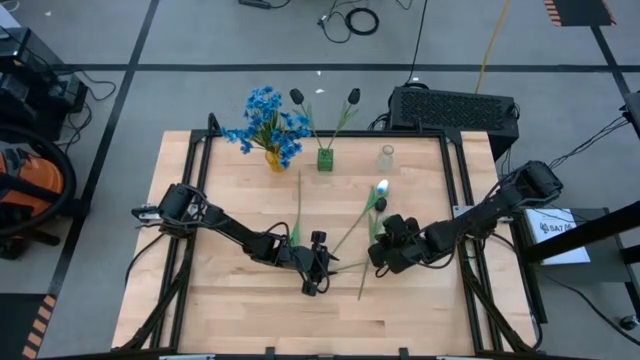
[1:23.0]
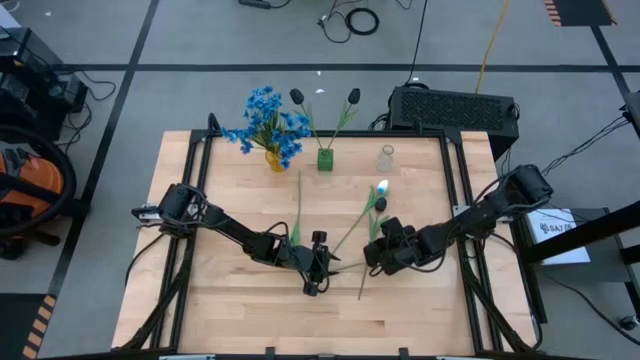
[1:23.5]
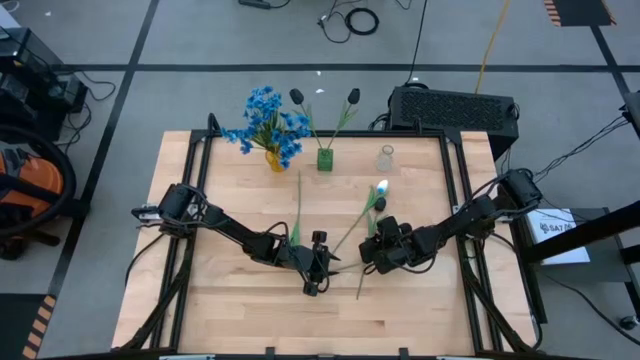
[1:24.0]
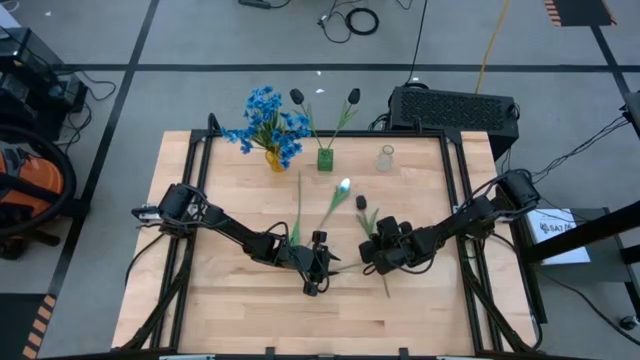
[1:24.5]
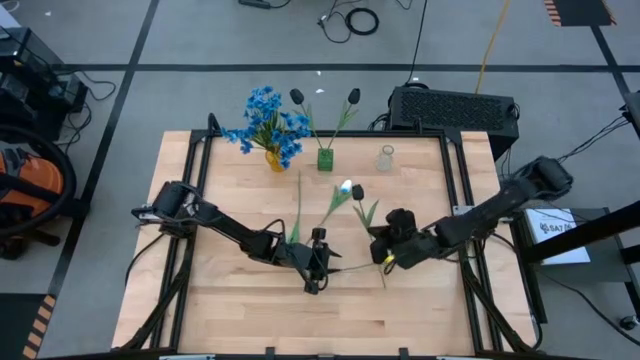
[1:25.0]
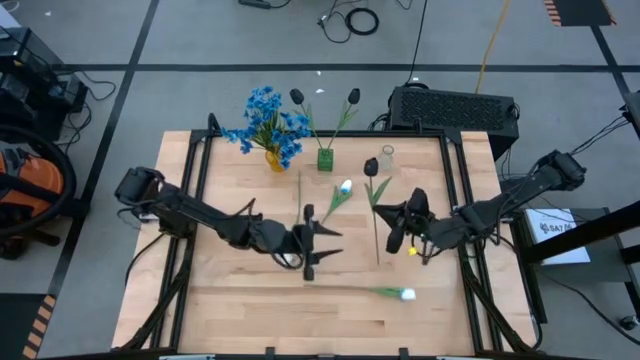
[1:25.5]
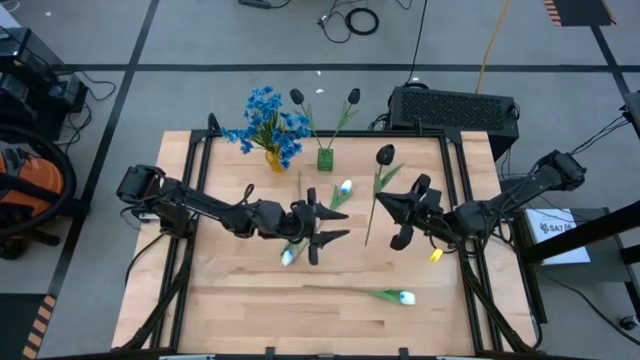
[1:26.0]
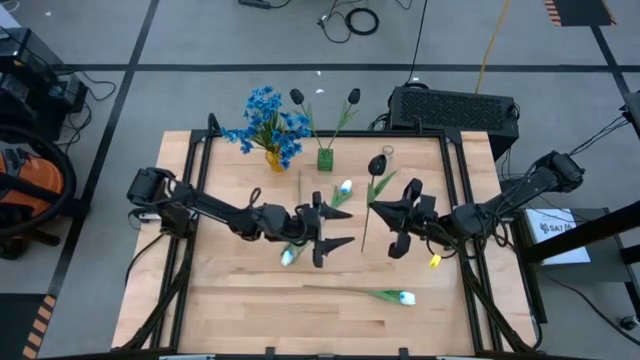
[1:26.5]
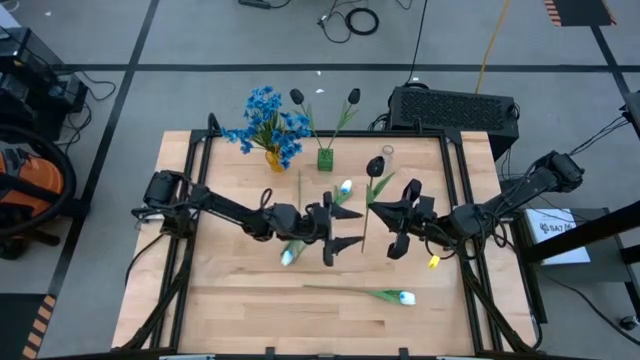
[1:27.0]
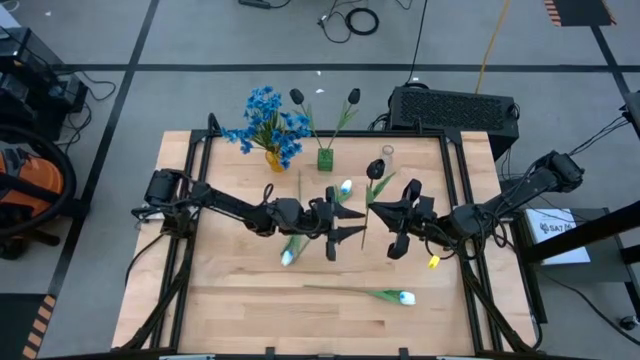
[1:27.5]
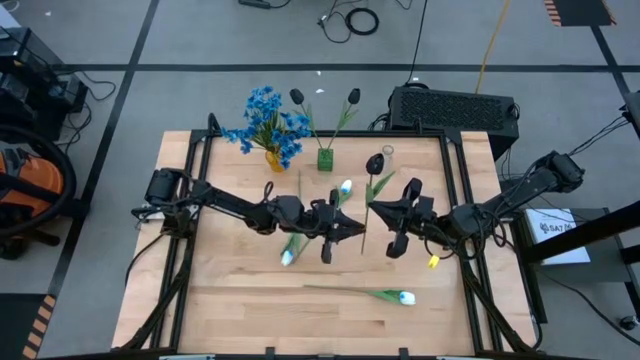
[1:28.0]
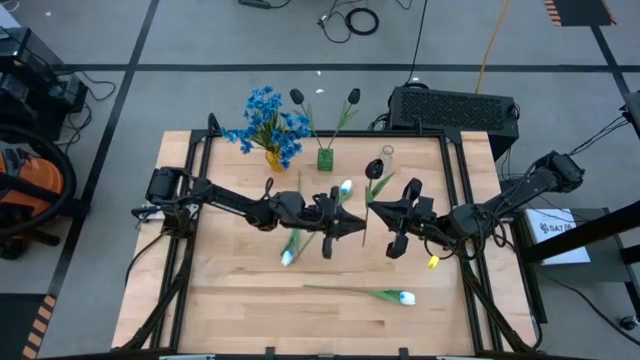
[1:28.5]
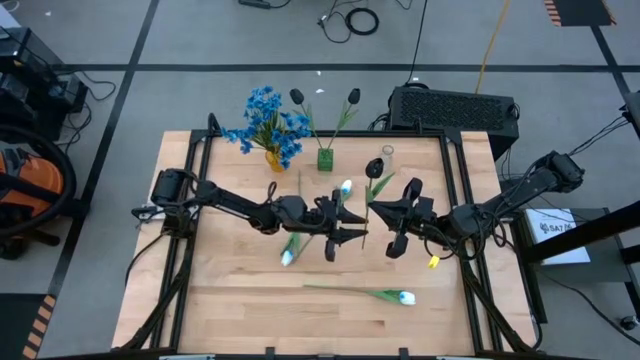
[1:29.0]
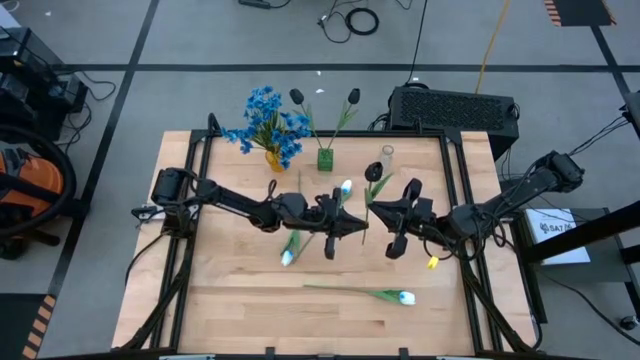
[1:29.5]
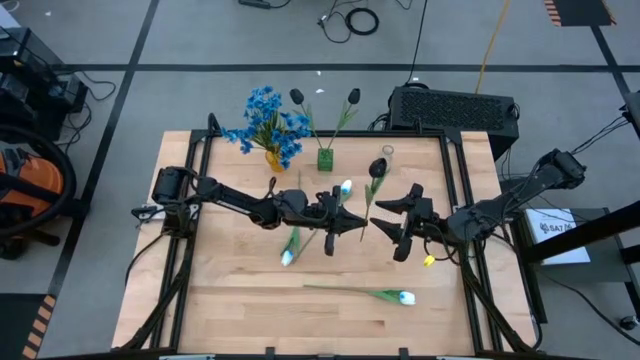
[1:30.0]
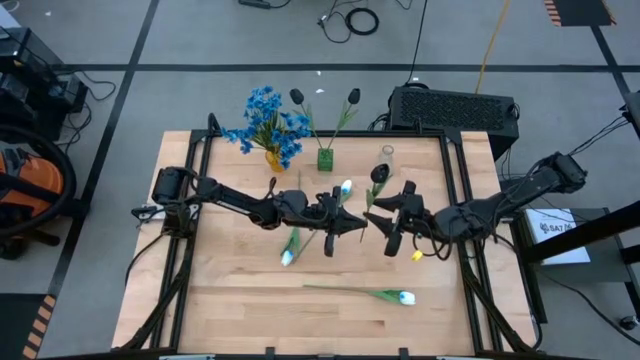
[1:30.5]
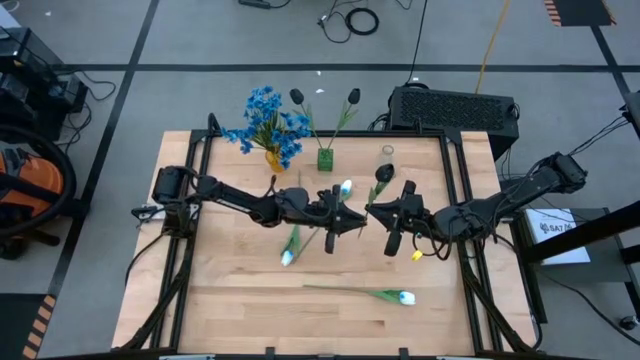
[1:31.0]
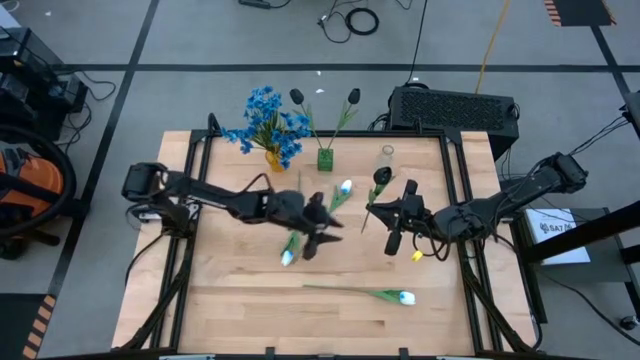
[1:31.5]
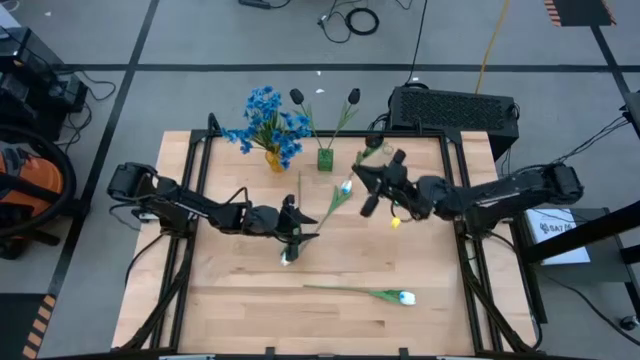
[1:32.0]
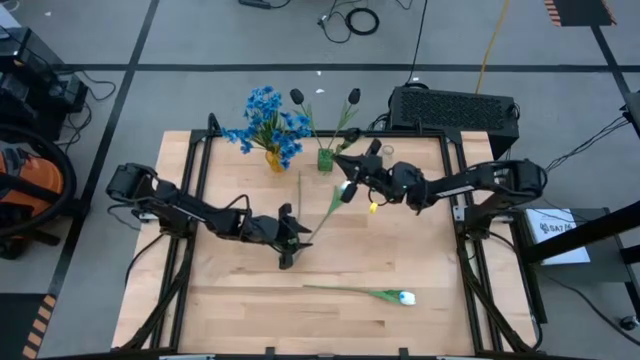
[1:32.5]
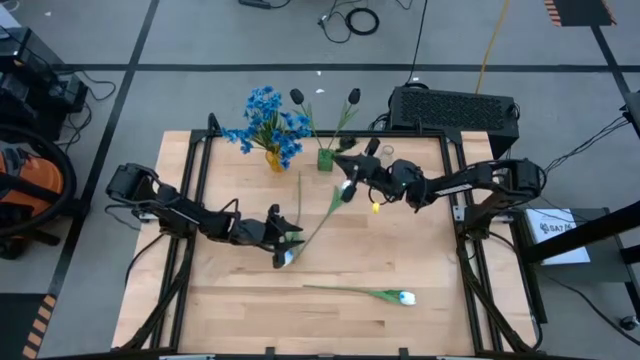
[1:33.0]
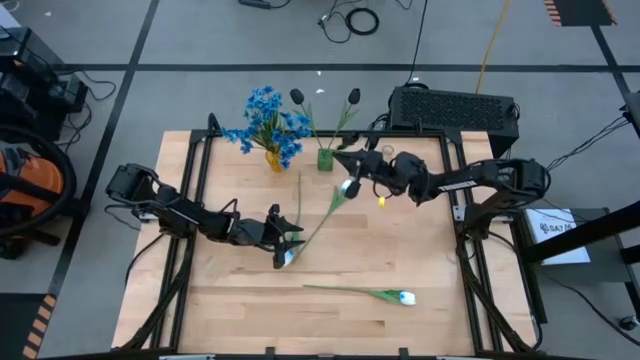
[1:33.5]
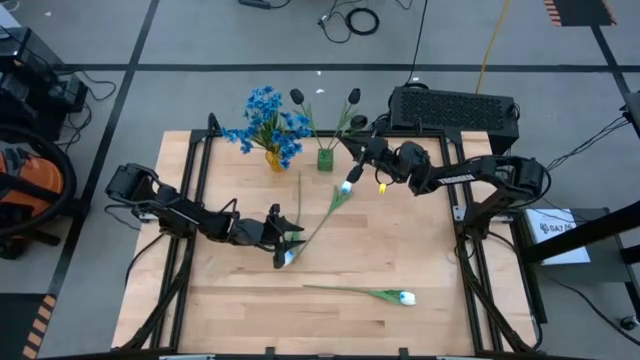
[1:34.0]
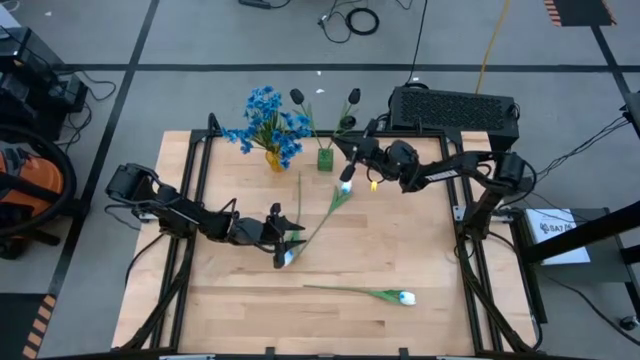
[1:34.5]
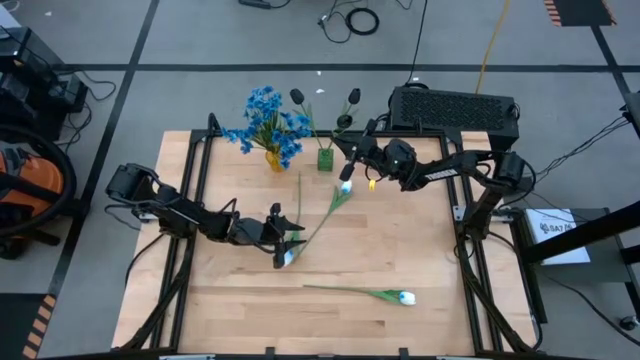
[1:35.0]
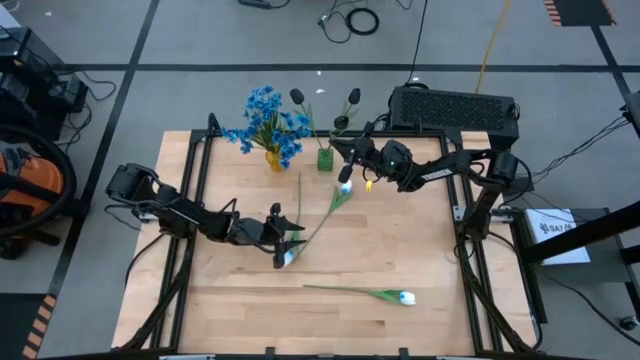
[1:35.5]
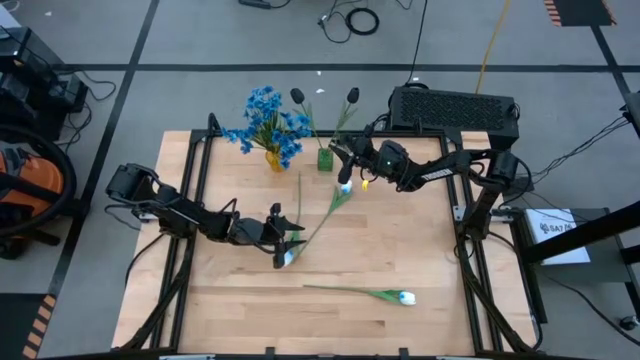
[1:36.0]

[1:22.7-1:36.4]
Task: Sort flowers into vase by color
Put the black tulip into the green vase

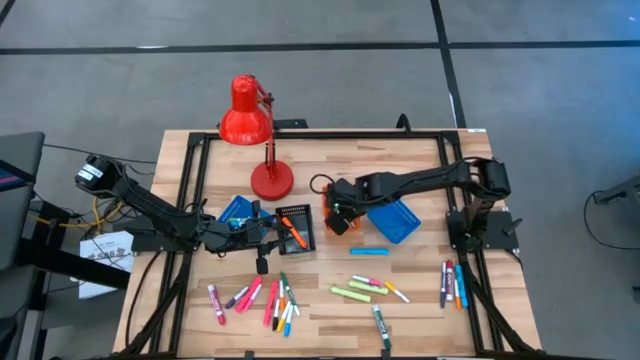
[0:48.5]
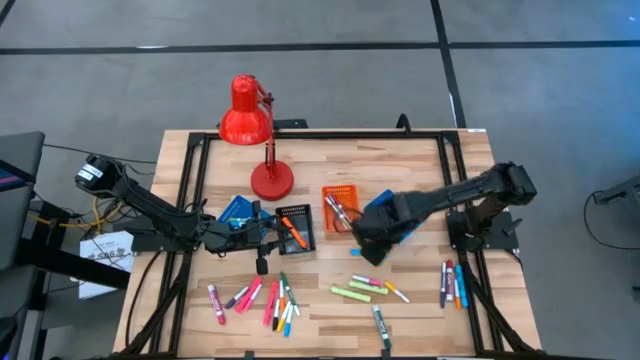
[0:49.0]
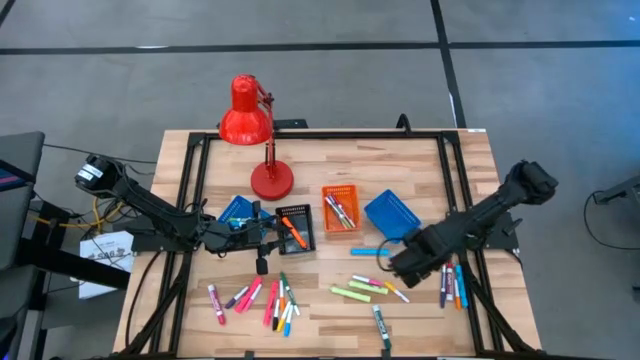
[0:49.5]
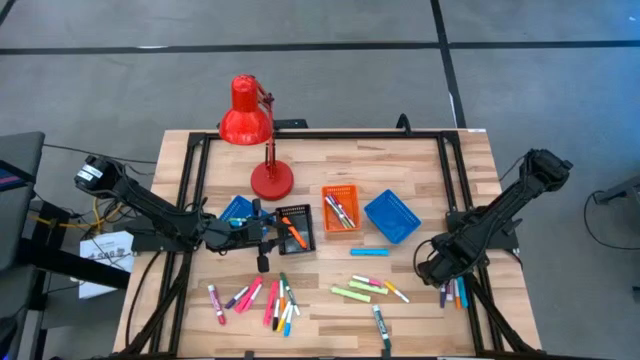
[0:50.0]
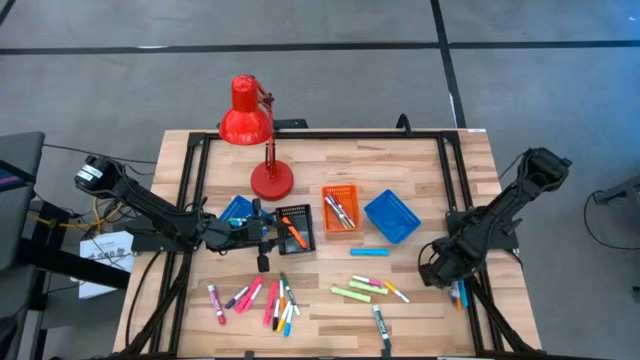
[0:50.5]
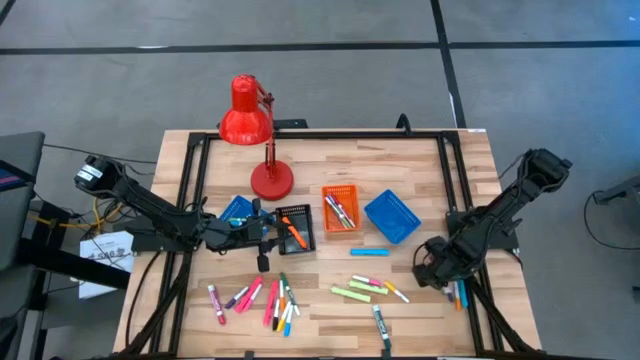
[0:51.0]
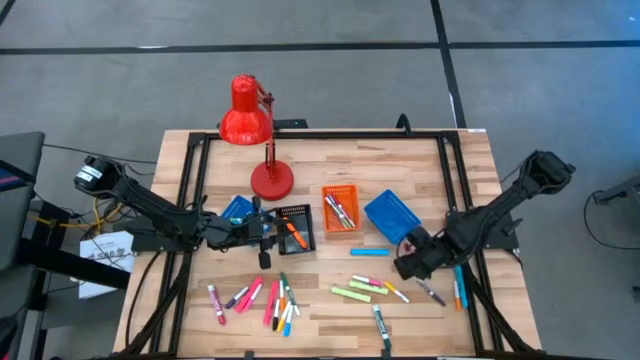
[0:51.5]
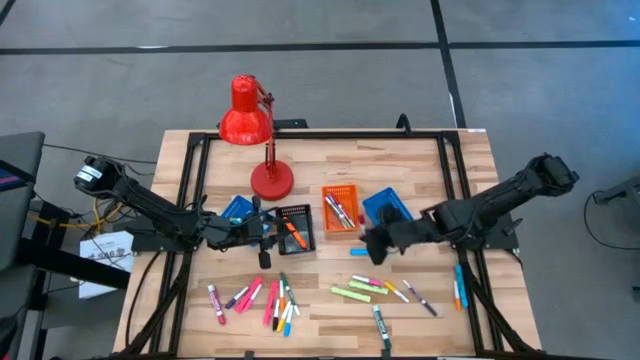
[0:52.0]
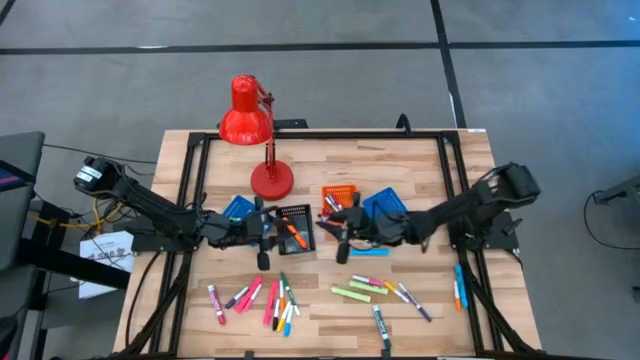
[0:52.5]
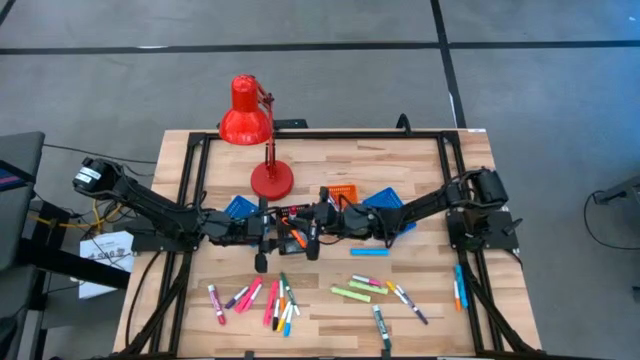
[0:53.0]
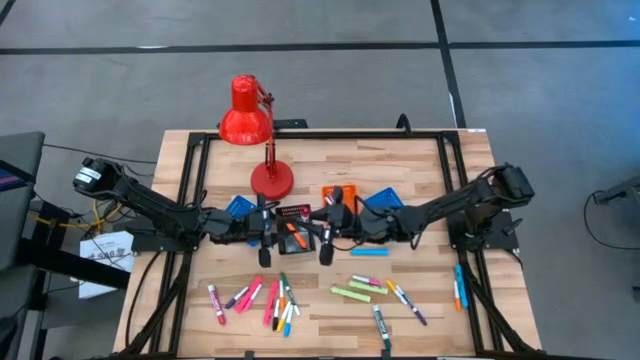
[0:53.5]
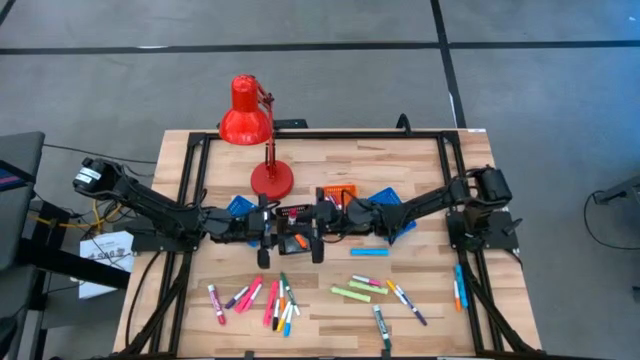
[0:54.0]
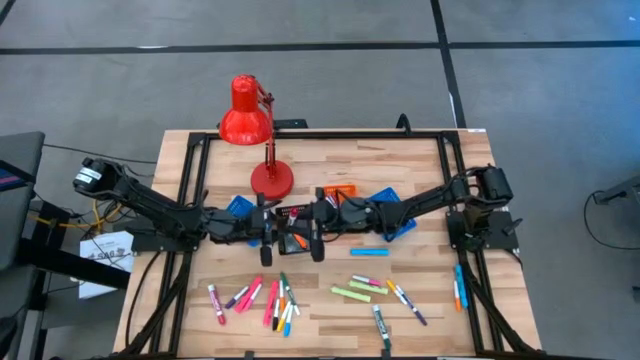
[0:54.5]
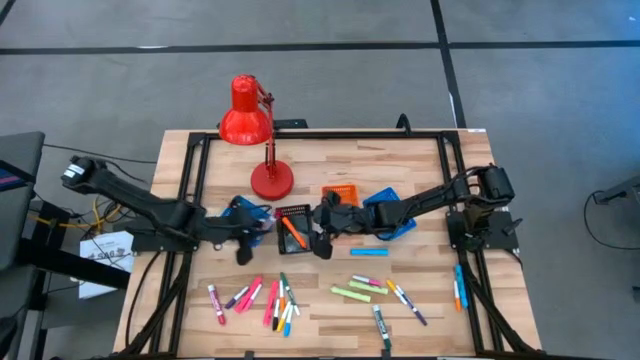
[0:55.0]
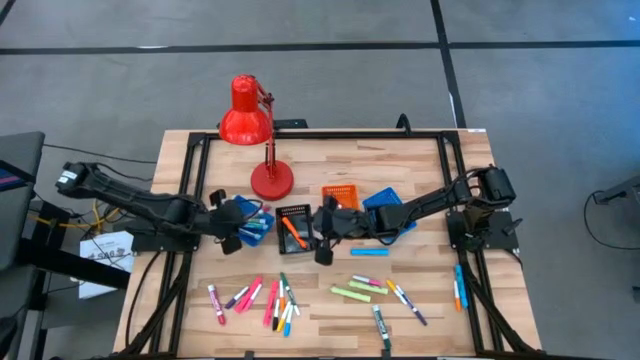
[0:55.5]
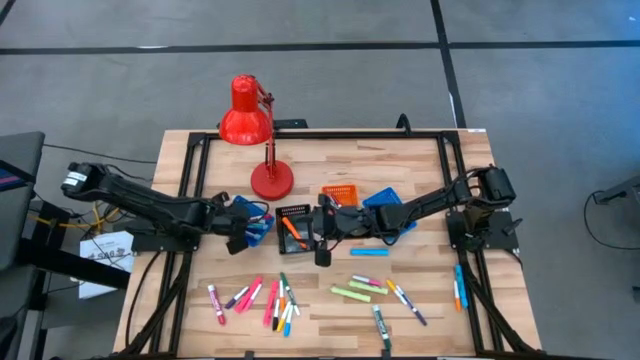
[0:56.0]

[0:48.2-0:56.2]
Task: Pick & Place Markers
Put the large red marker pen into the left blue basket

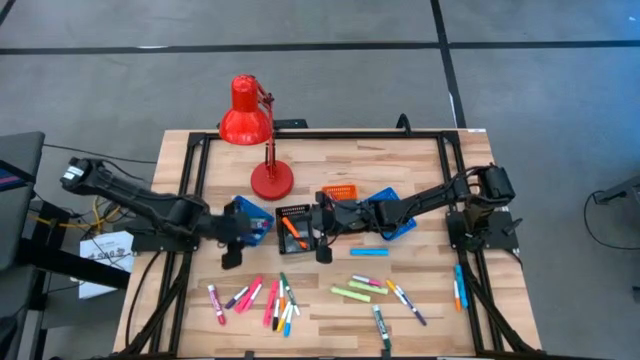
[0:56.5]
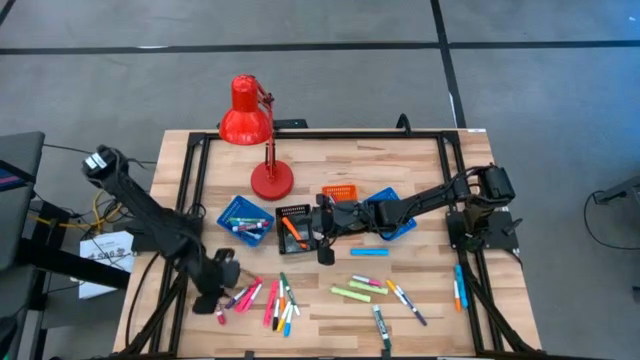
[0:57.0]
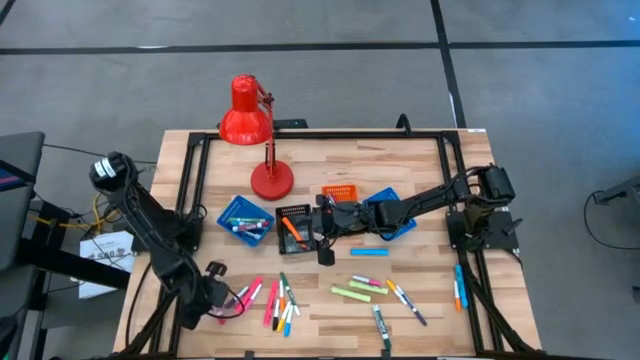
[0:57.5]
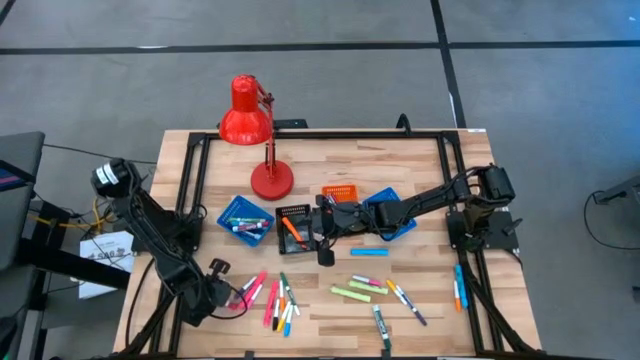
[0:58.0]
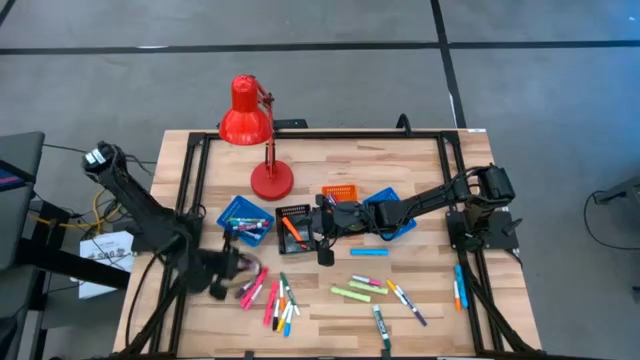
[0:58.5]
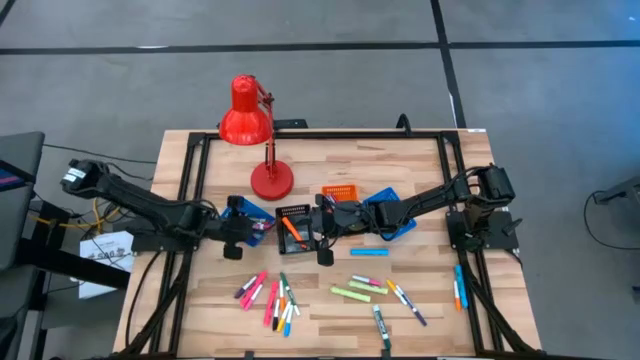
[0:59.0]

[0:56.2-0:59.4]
Put the large pink marker pen into the left blue basket
